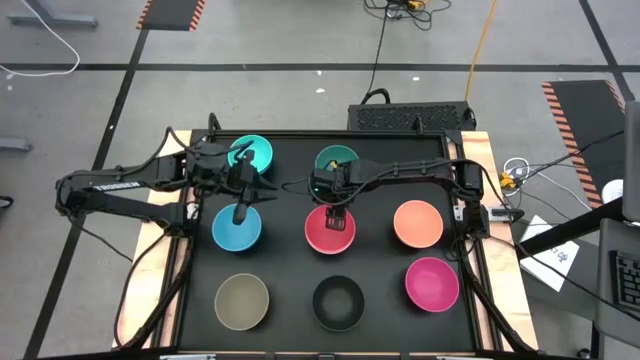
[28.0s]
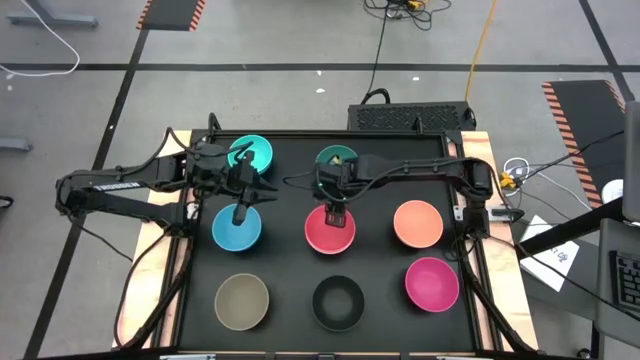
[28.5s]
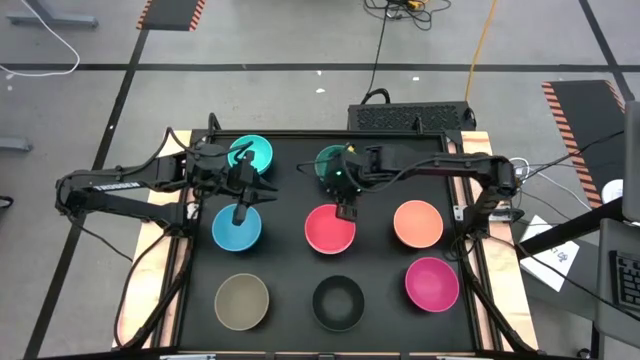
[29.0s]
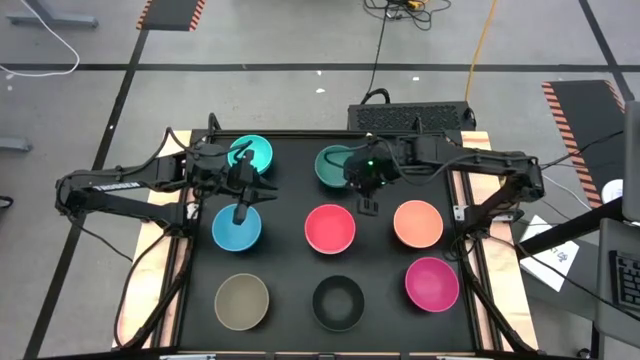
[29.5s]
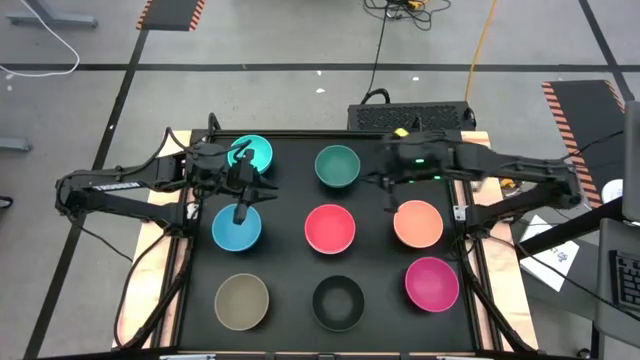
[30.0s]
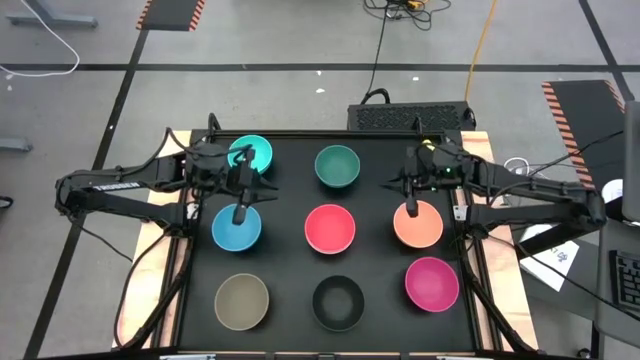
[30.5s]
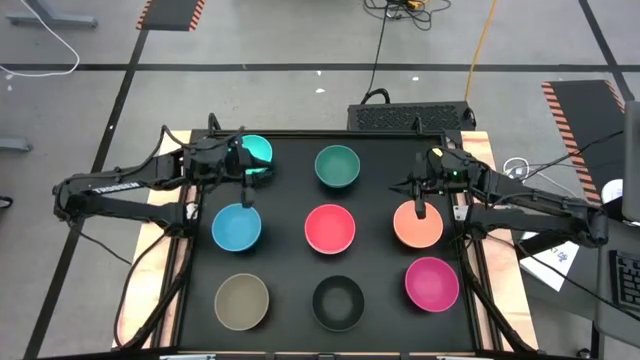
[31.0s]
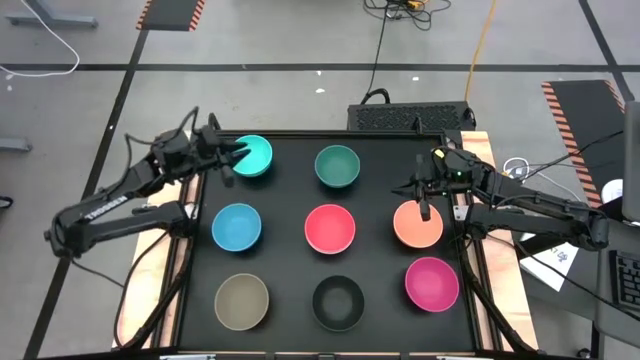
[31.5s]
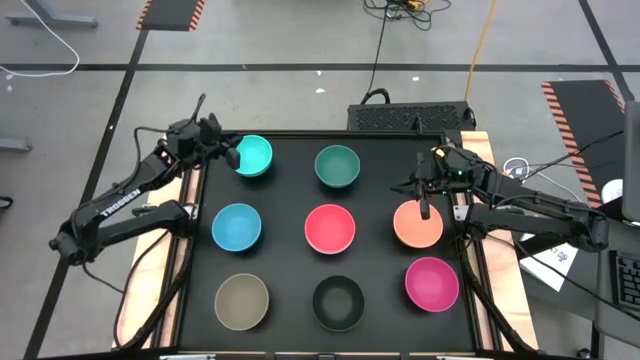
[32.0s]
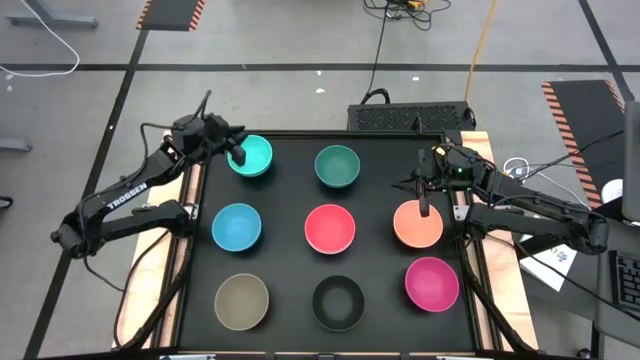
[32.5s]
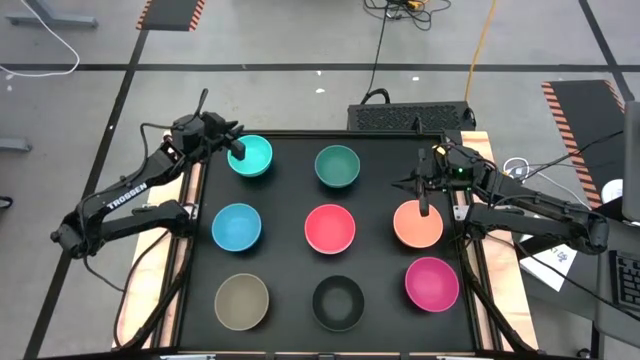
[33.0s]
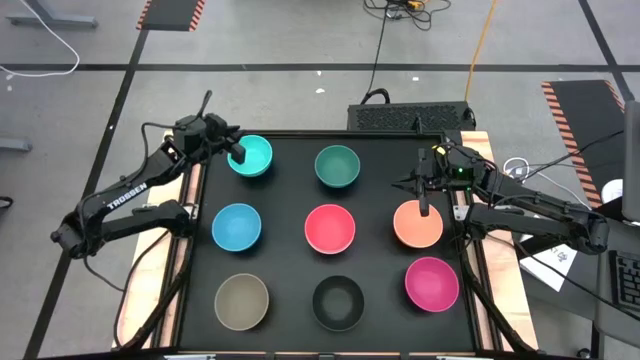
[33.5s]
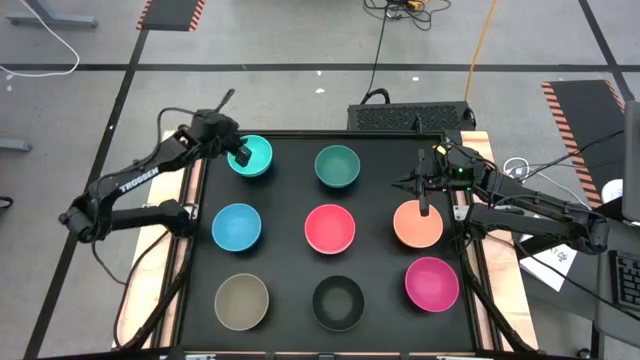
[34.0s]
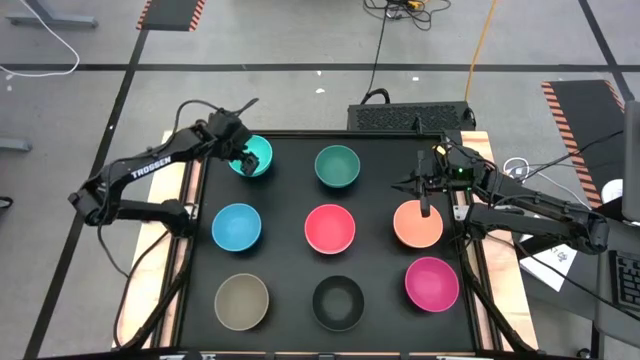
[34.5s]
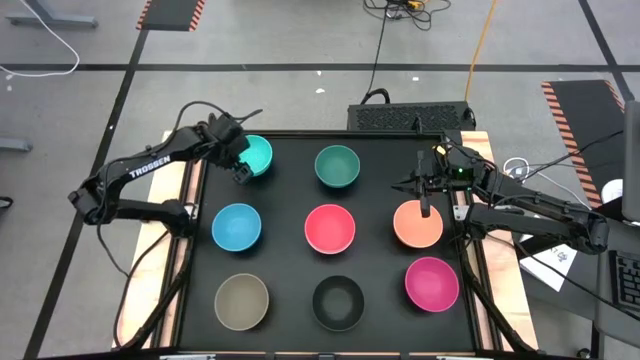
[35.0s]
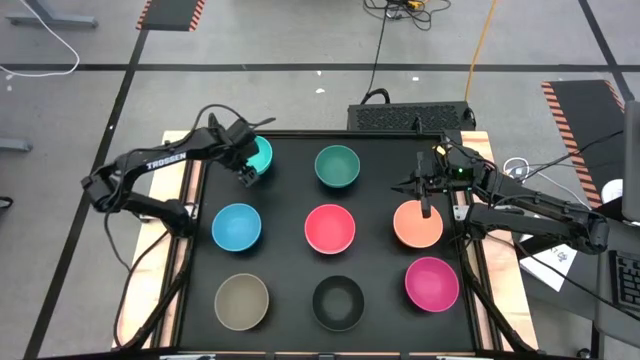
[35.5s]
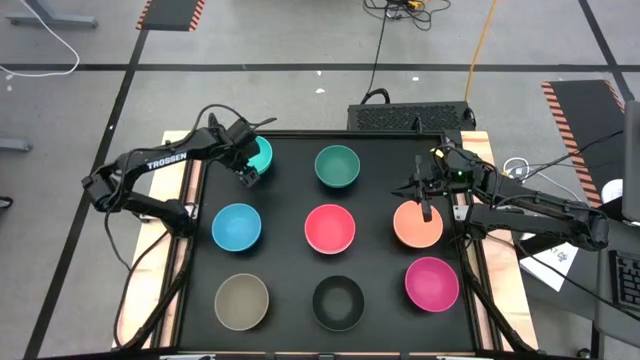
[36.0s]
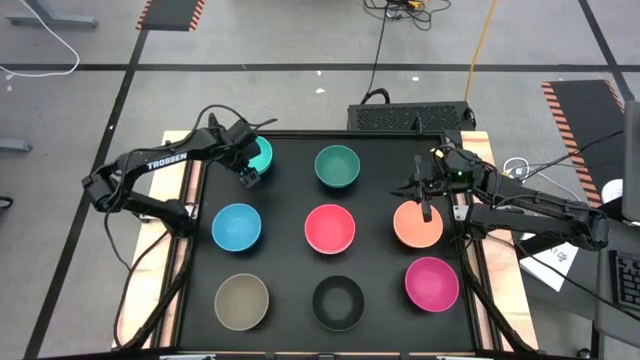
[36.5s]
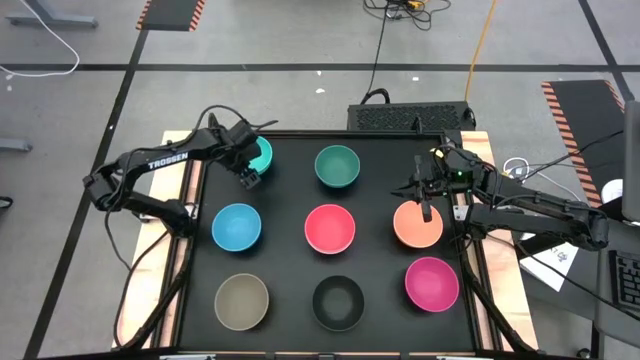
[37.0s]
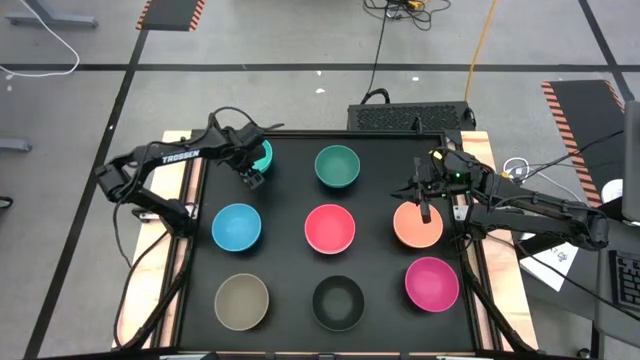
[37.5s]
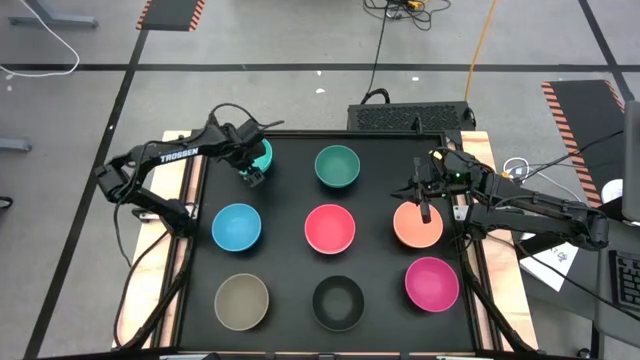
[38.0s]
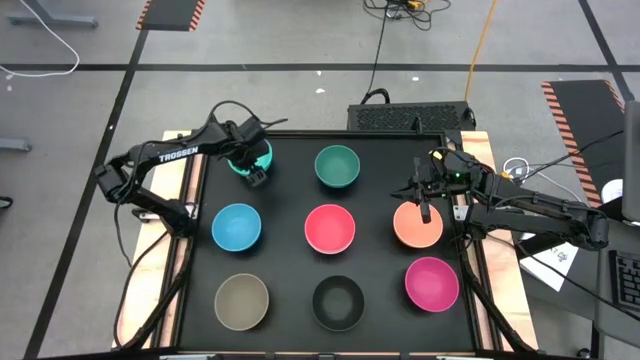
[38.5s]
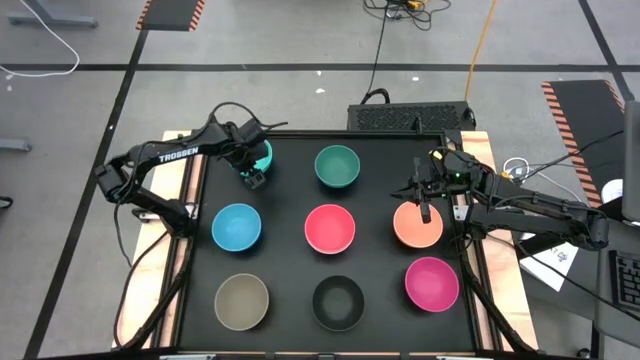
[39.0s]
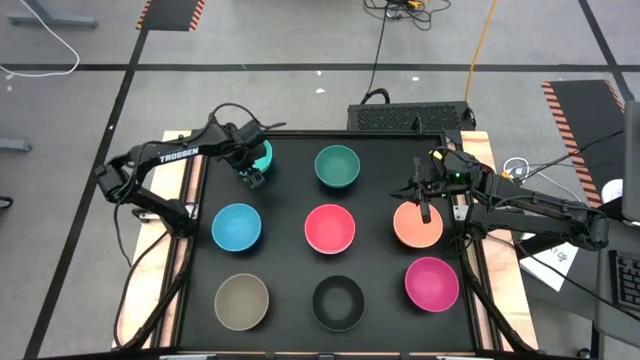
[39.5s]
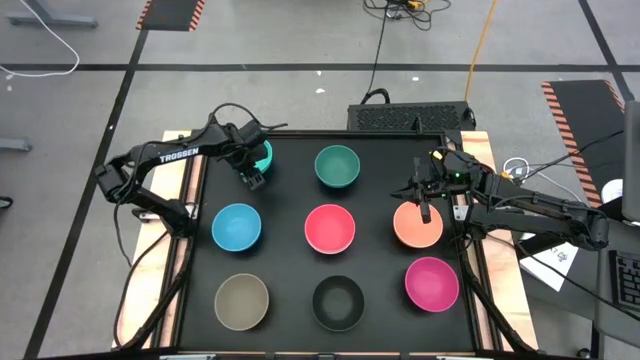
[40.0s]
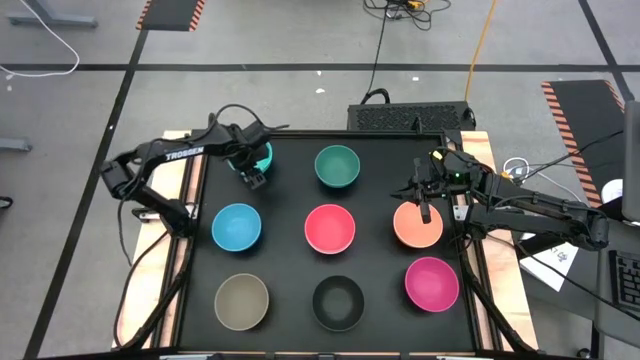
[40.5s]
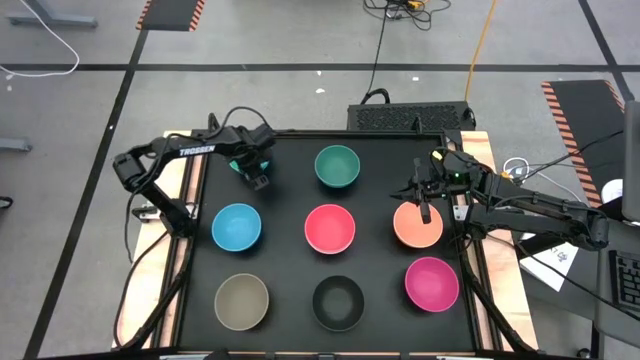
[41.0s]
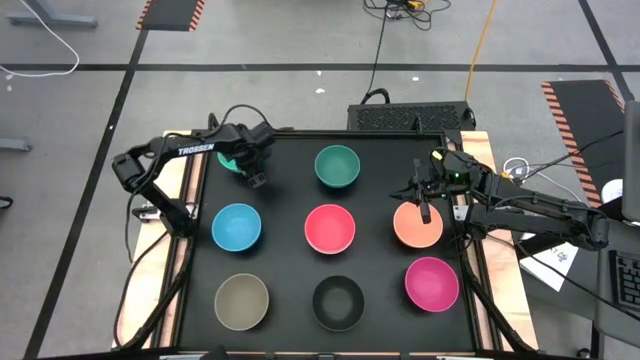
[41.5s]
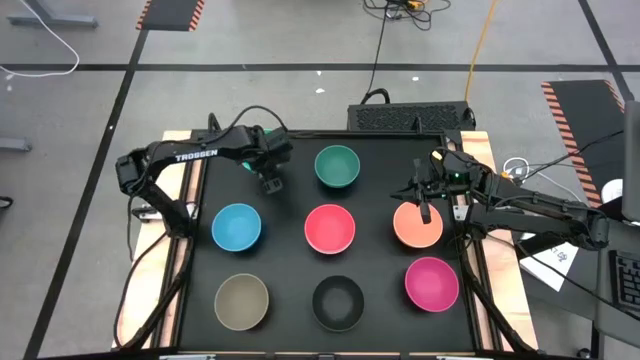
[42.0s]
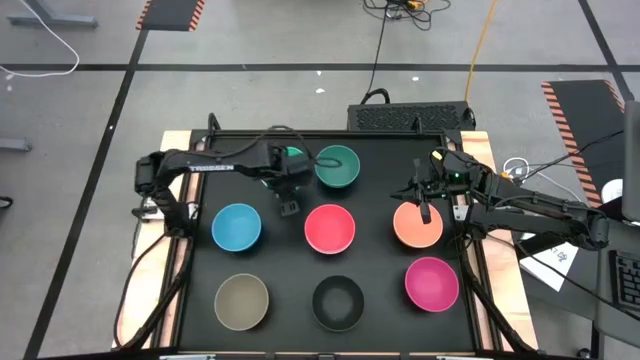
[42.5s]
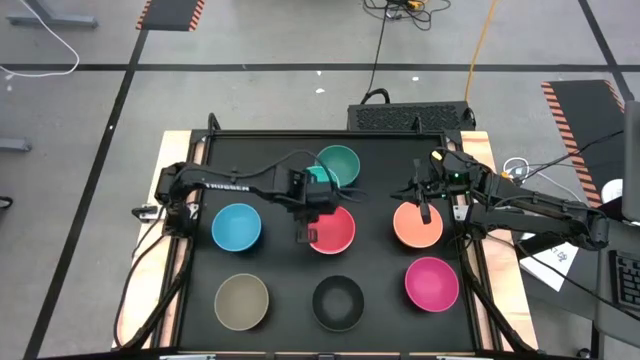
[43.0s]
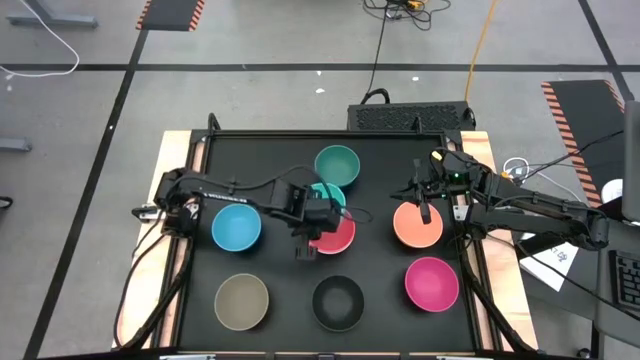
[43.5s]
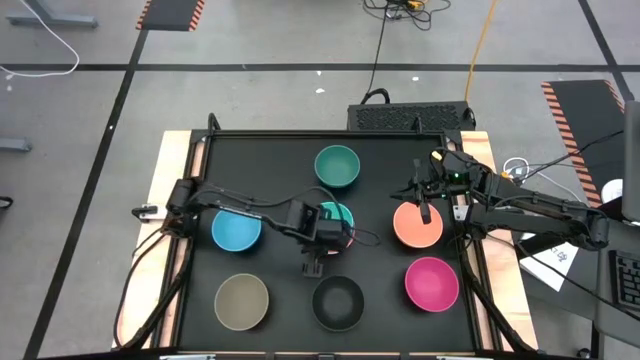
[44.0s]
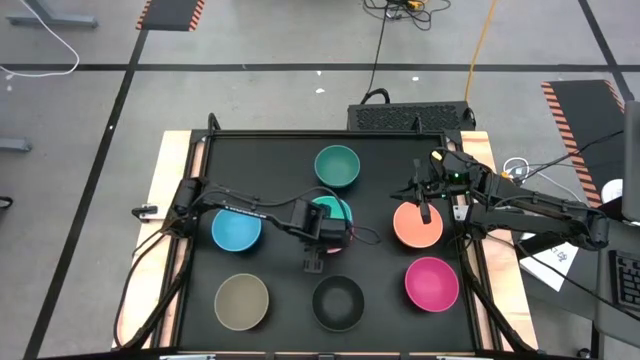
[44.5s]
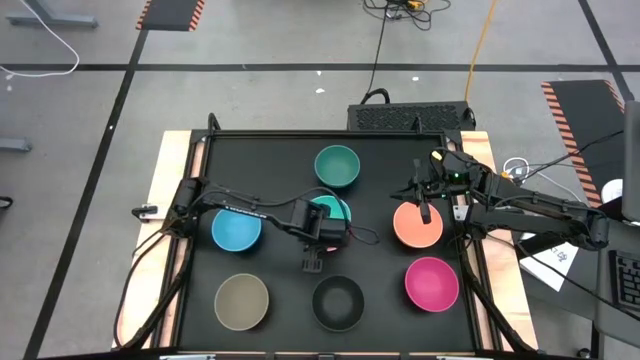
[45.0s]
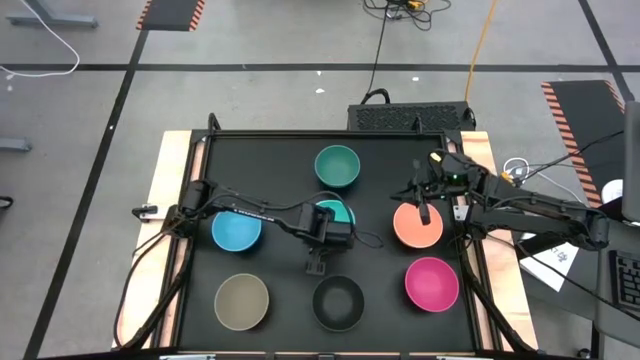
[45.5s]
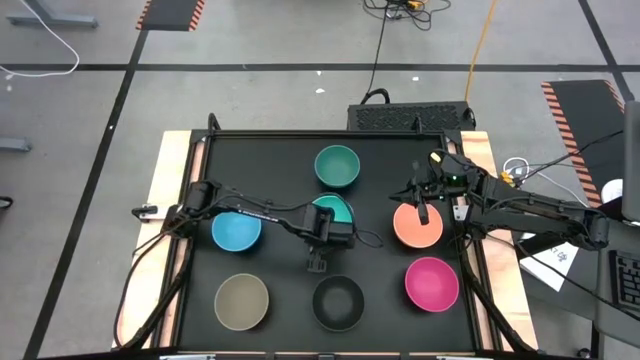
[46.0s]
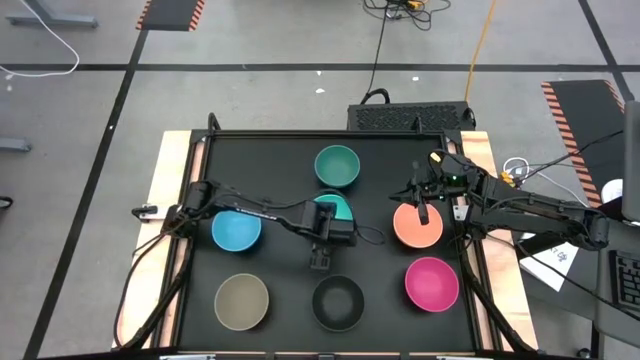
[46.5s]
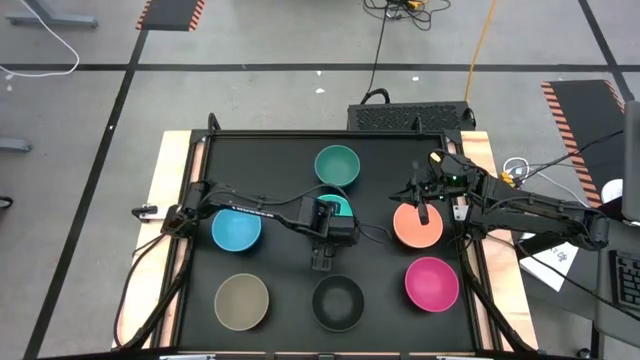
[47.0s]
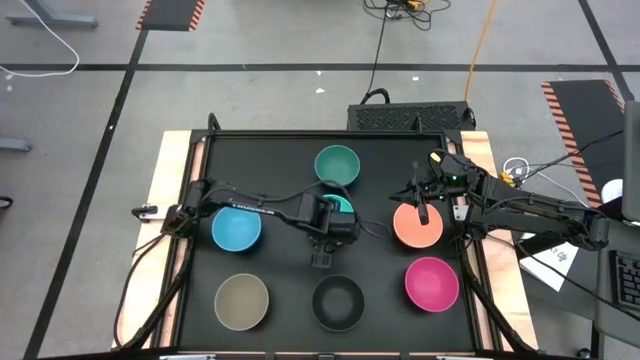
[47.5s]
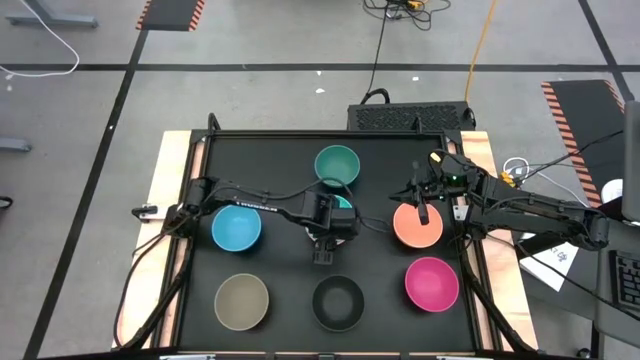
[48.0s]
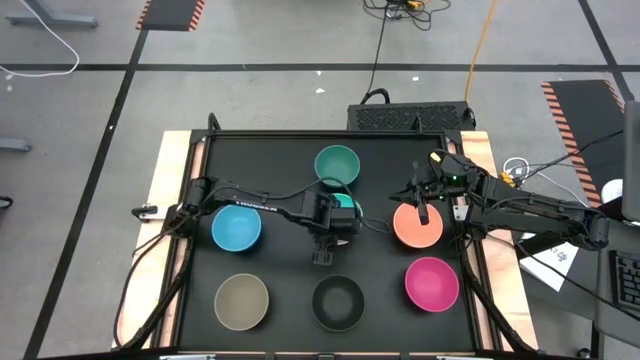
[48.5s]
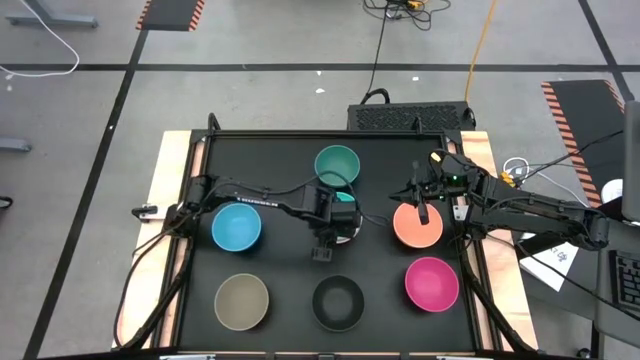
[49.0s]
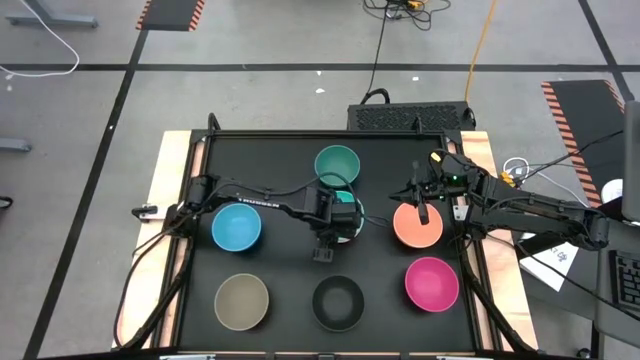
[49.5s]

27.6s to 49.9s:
Task: Nest bowls inside each other
Stack the light blue bowl on top of the orange bowl
